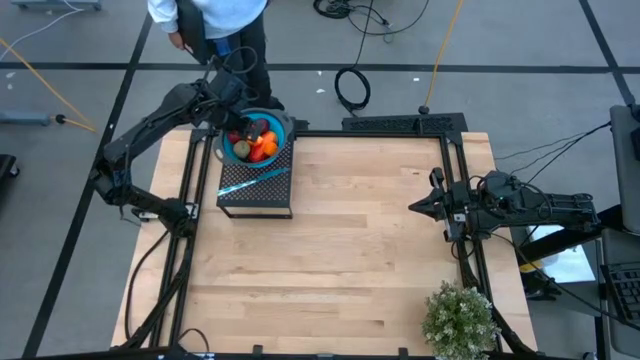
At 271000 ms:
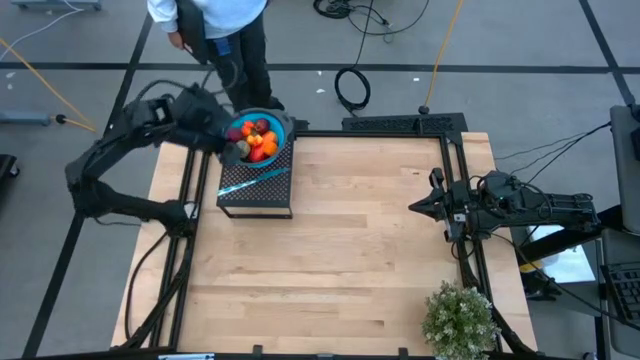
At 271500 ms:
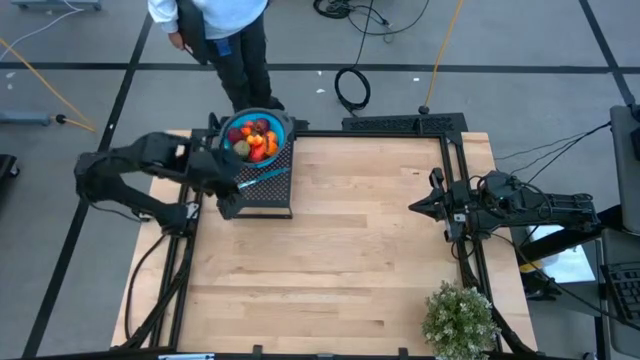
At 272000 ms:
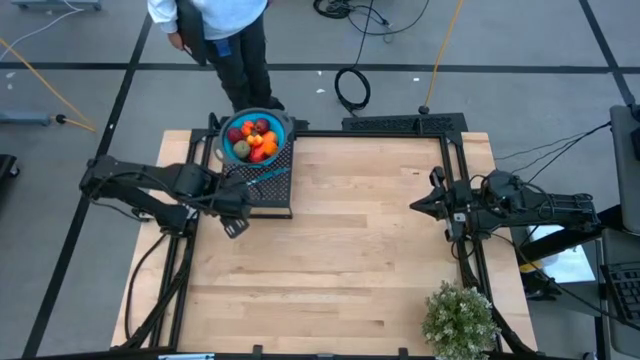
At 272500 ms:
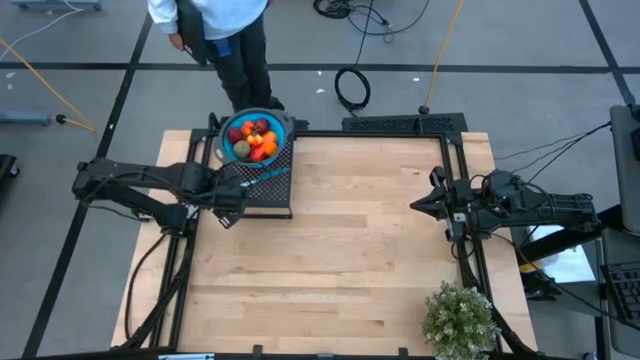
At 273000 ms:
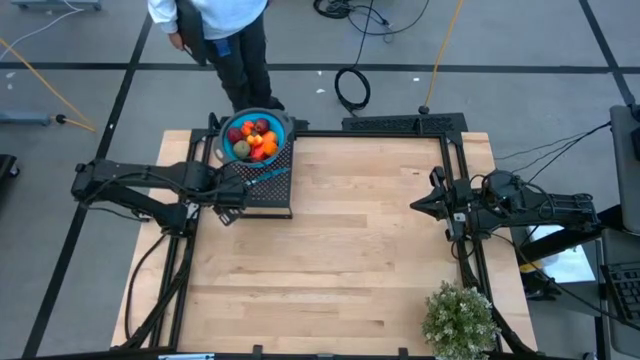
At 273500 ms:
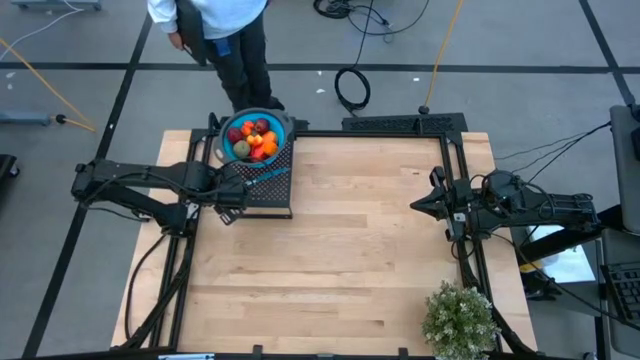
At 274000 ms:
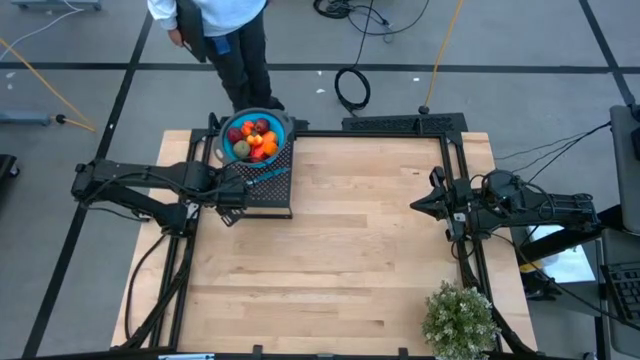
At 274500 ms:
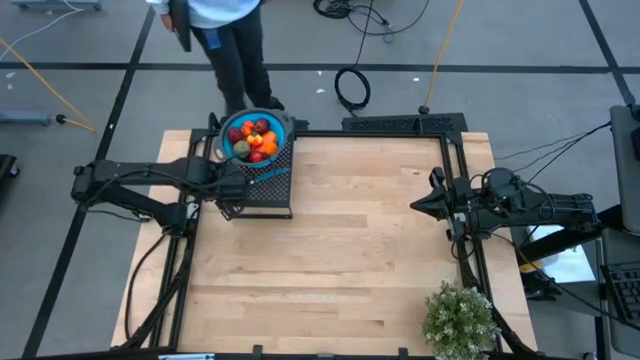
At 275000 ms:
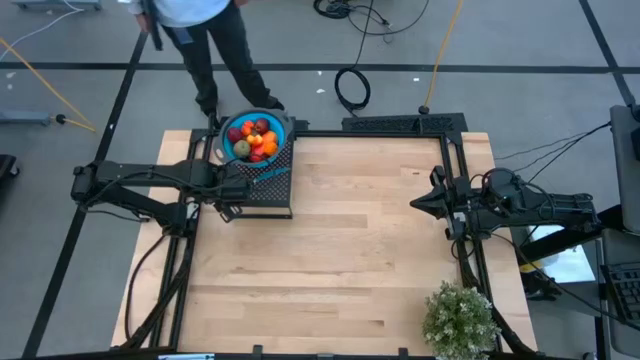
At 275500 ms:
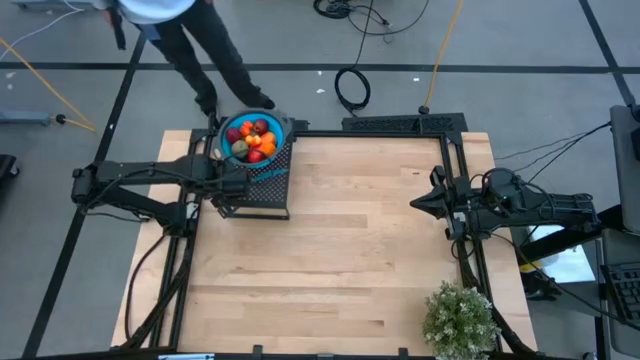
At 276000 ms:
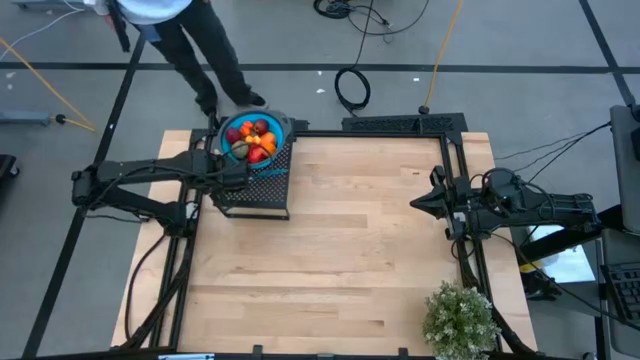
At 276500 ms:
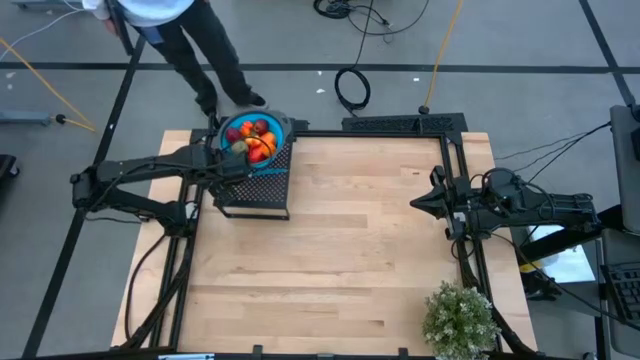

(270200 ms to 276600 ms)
Task: Pick & Place Fruit
Adjust the knife on the shelf

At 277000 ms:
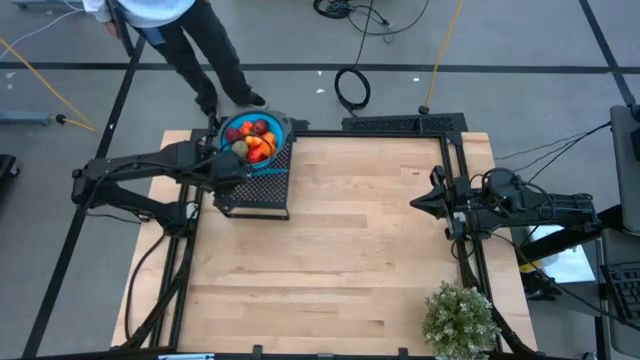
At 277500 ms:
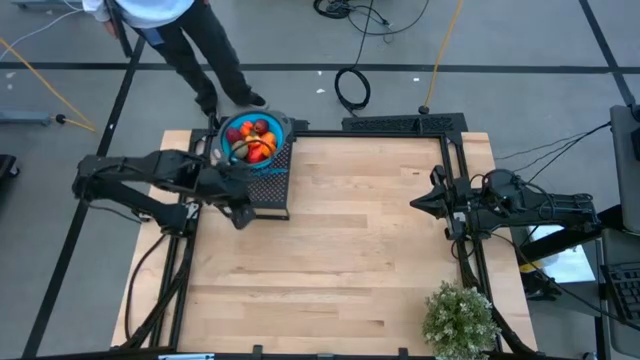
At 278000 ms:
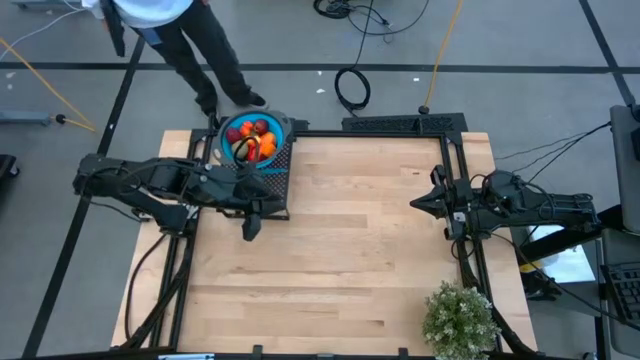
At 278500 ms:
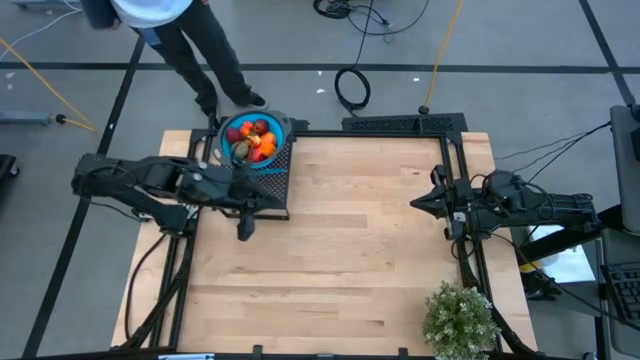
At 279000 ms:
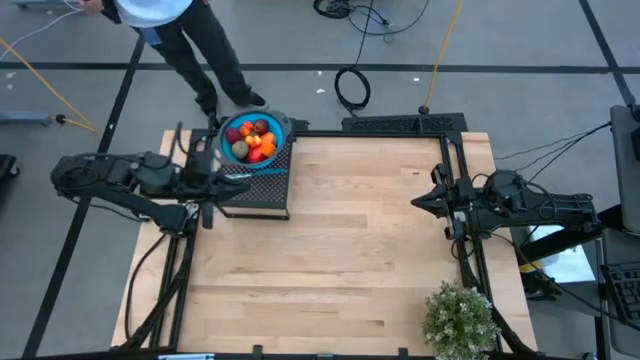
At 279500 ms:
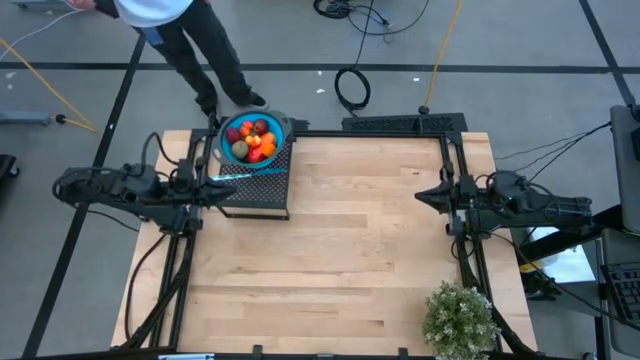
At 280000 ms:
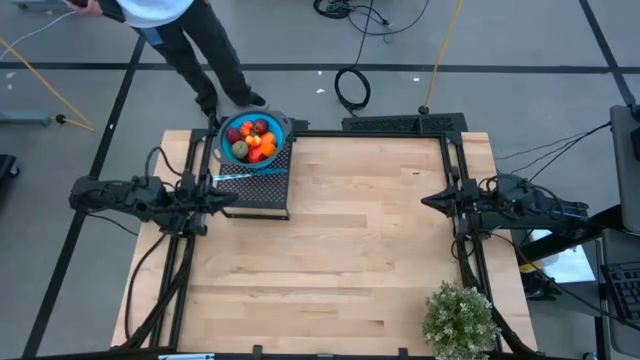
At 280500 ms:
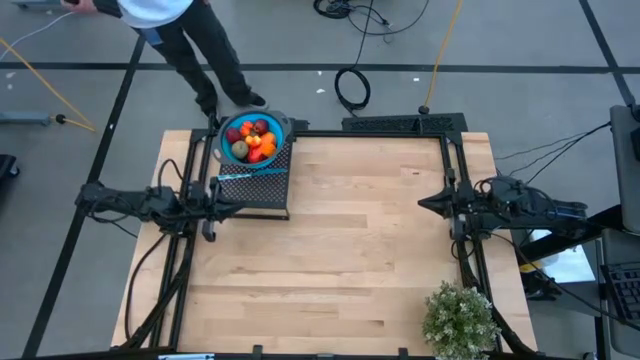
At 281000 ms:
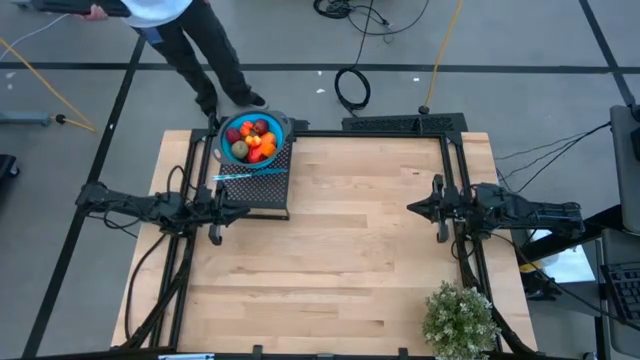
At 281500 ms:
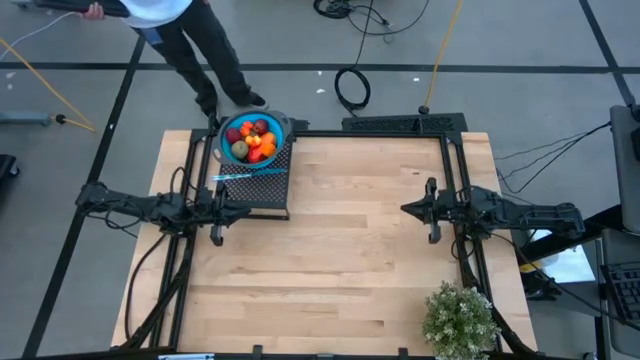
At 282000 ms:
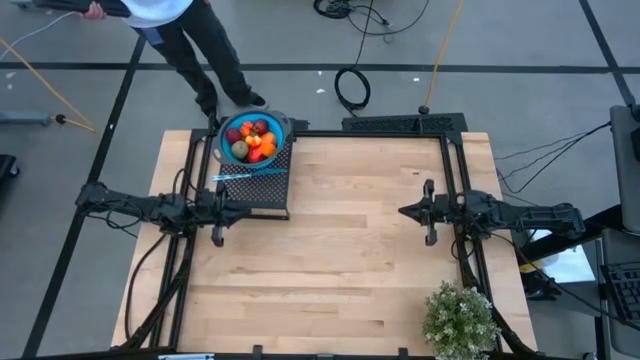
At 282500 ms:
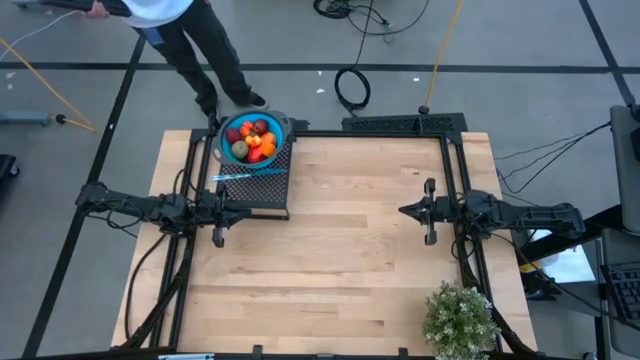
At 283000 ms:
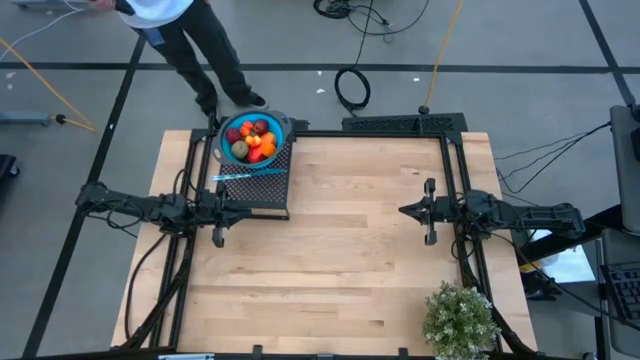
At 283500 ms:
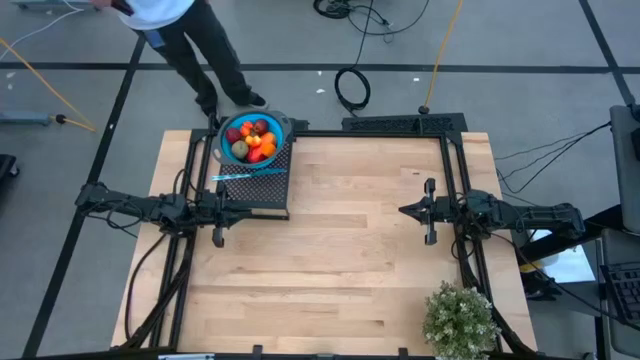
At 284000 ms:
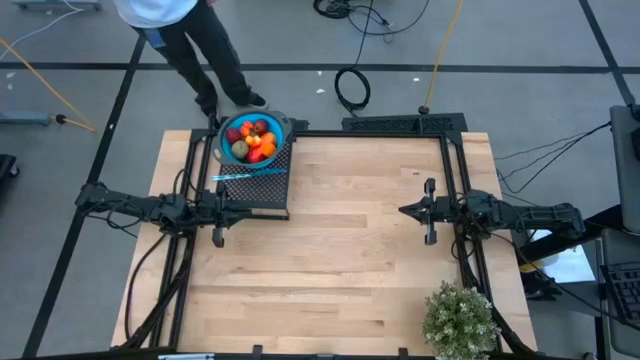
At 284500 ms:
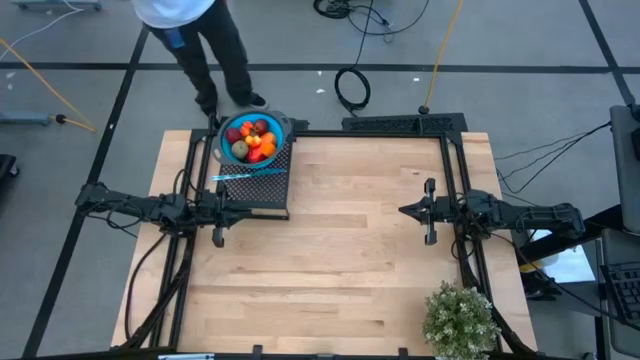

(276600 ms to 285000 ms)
Return to Home Position

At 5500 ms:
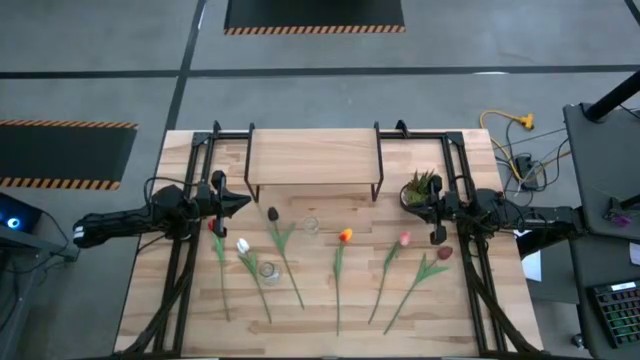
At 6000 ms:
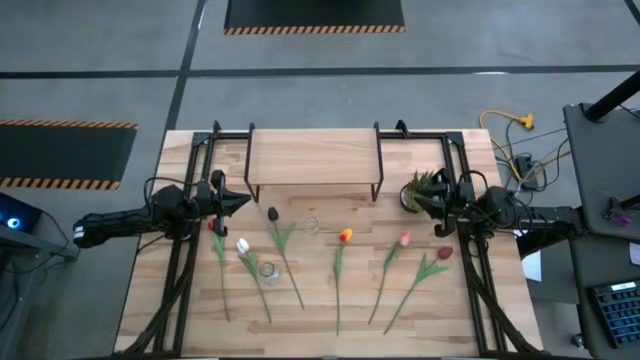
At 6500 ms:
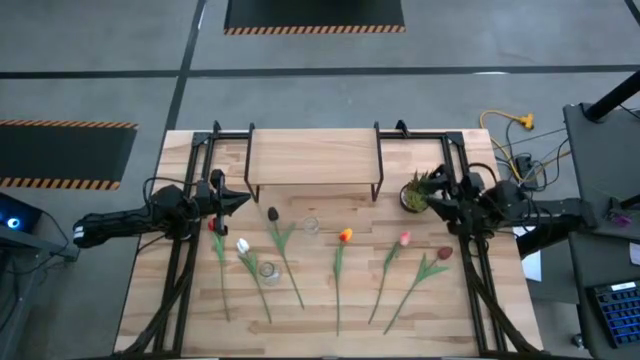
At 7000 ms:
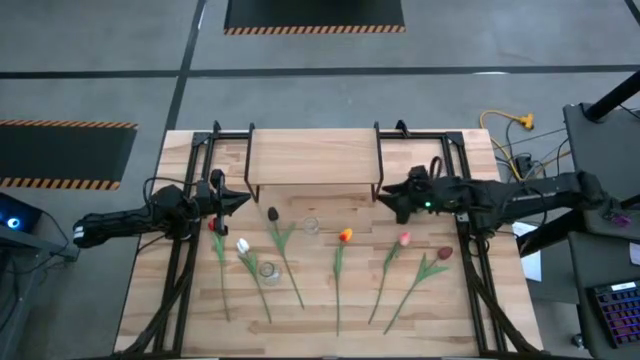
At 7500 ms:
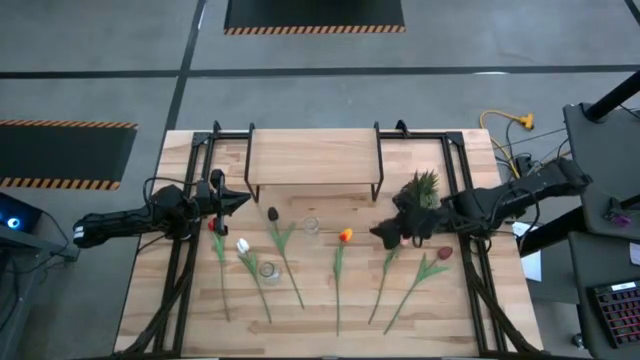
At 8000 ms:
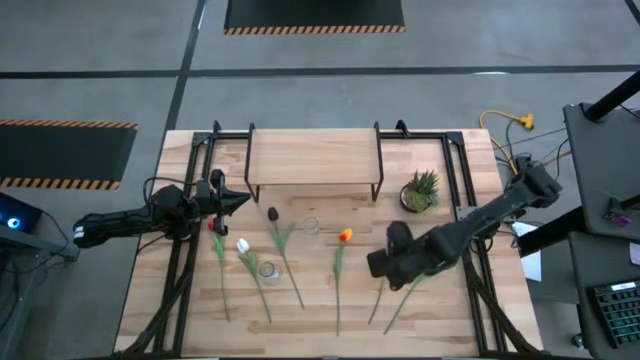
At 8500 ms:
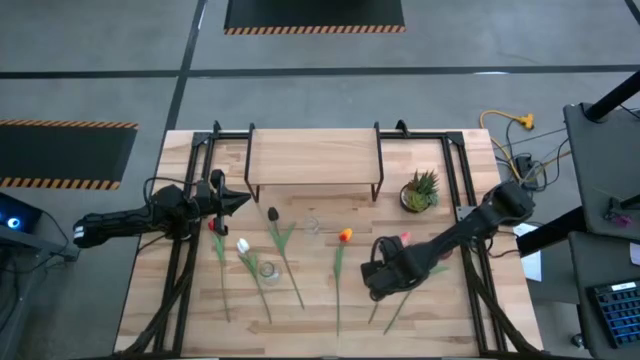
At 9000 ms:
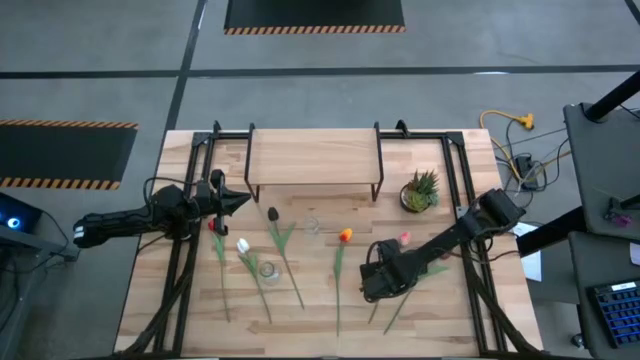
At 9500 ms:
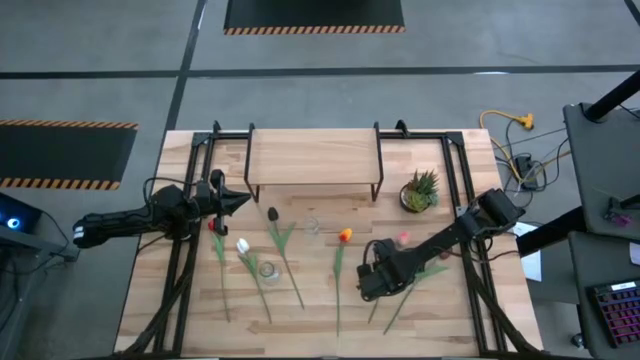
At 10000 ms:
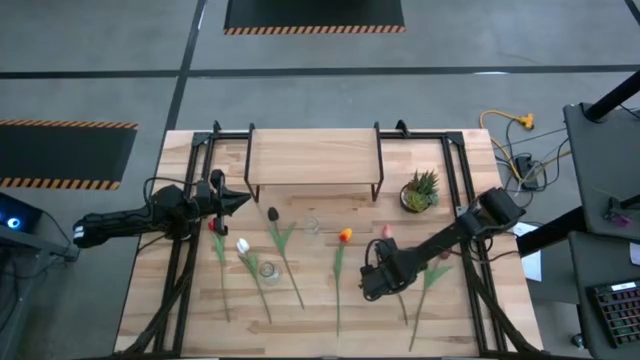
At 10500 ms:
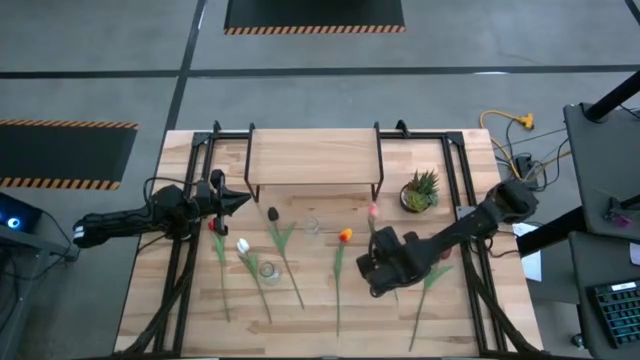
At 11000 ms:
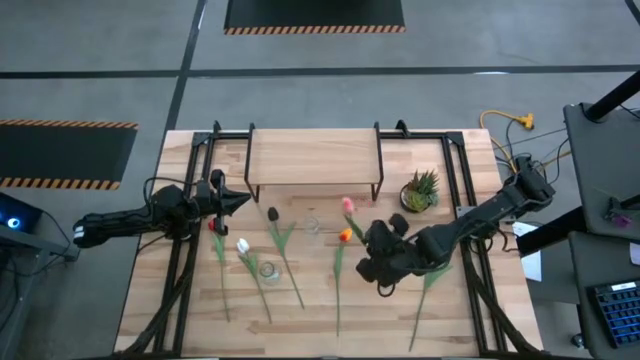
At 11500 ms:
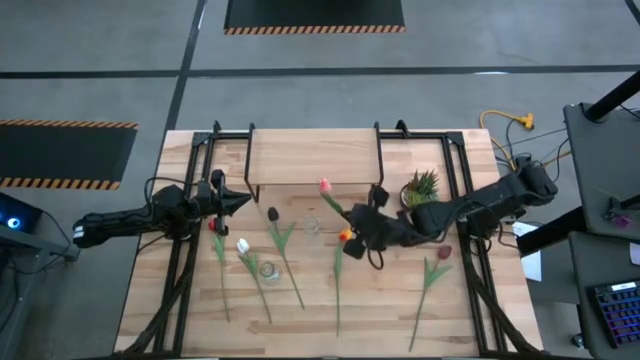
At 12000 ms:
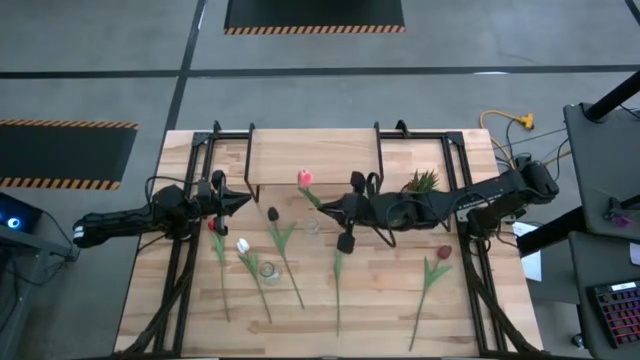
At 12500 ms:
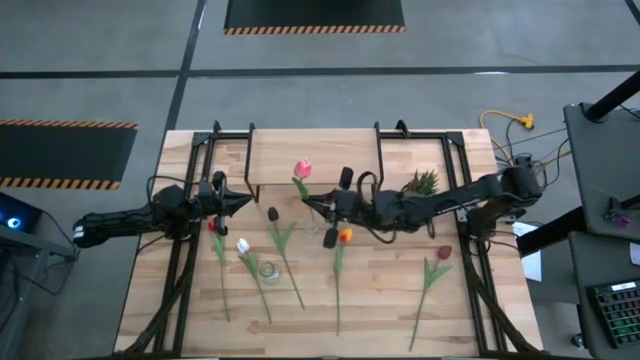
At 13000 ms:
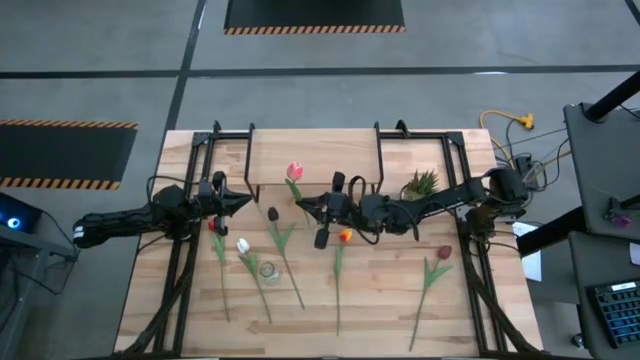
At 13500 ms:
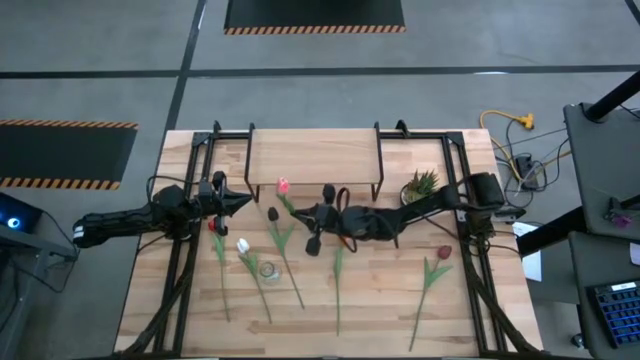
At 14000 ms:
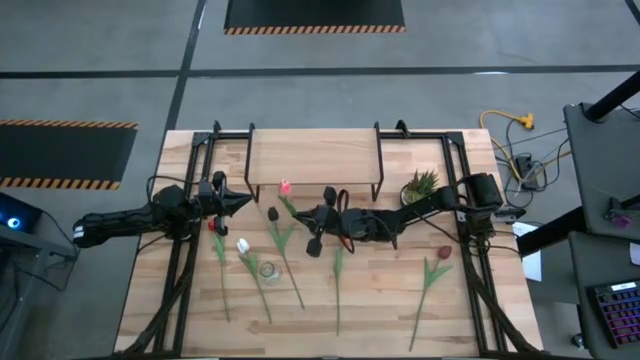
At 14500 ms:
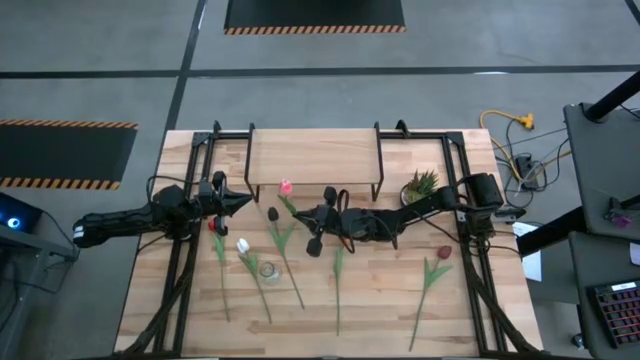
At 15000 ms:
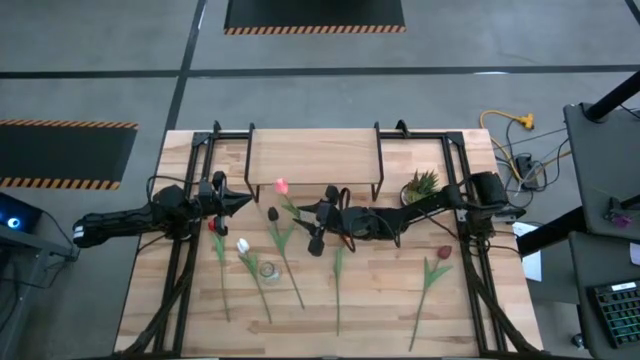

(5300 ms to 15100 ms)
Task: Pick and place flowers into a vace then onto a shelf
Put the pink flower into the top transparent vase
